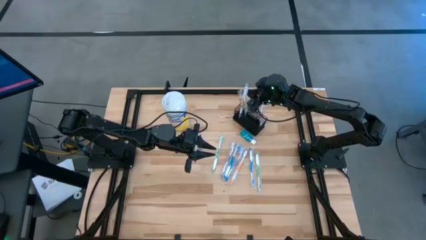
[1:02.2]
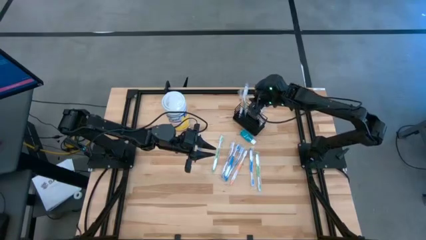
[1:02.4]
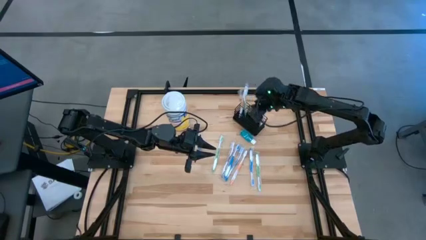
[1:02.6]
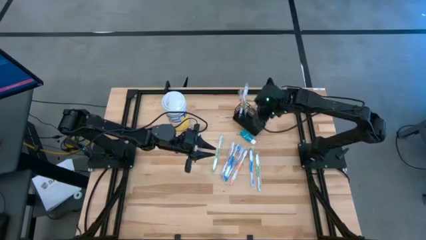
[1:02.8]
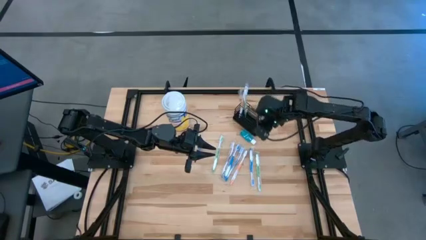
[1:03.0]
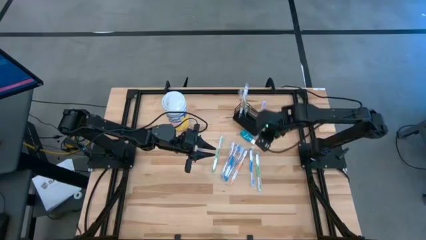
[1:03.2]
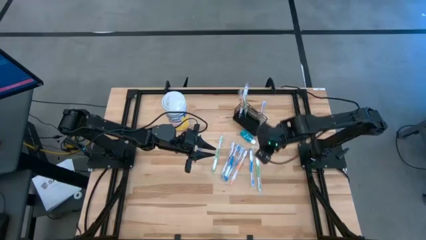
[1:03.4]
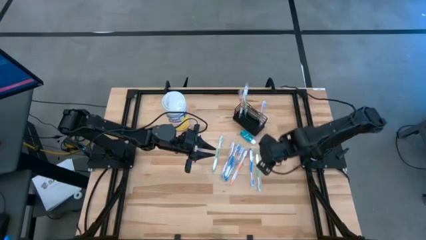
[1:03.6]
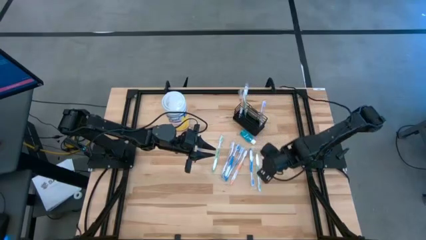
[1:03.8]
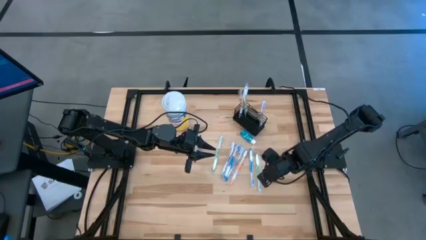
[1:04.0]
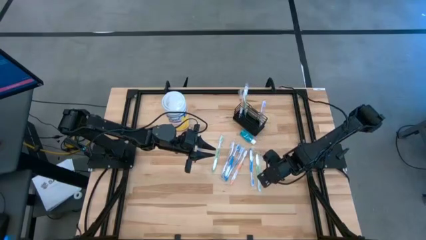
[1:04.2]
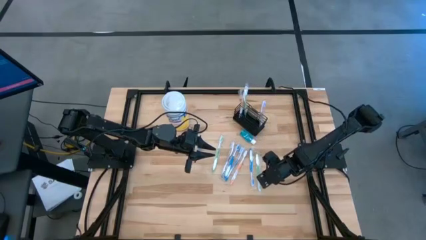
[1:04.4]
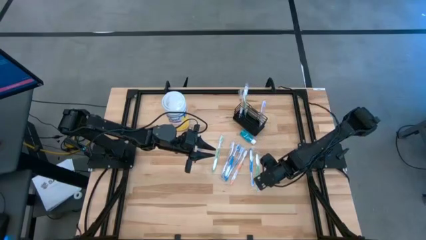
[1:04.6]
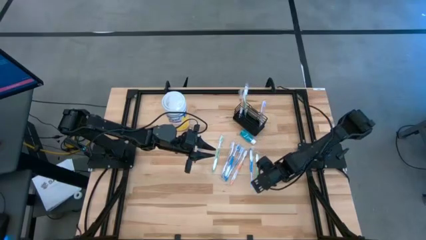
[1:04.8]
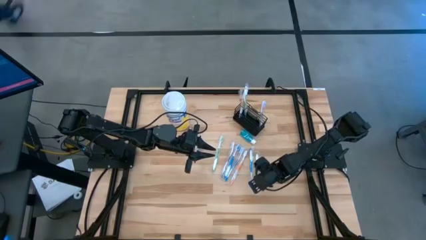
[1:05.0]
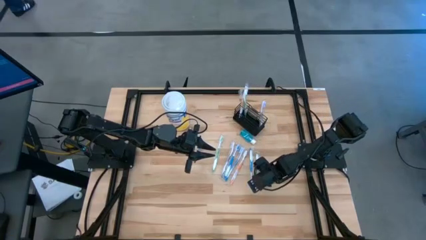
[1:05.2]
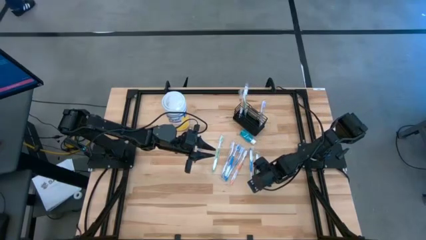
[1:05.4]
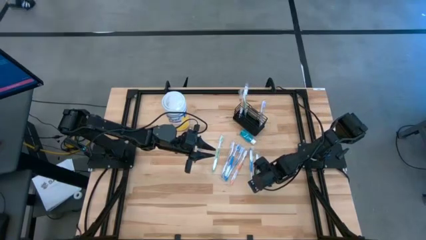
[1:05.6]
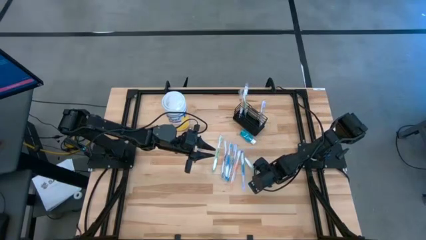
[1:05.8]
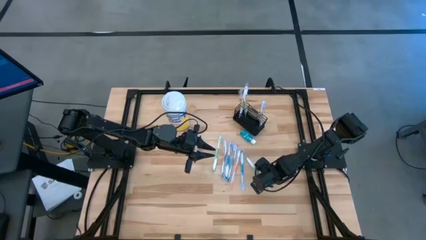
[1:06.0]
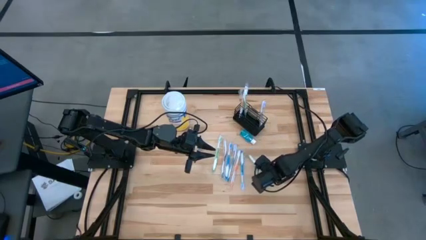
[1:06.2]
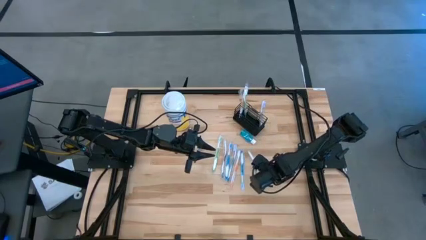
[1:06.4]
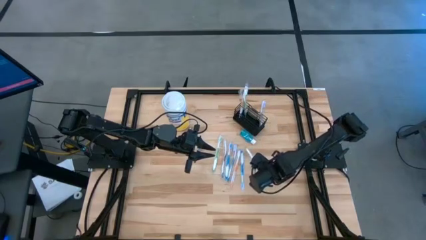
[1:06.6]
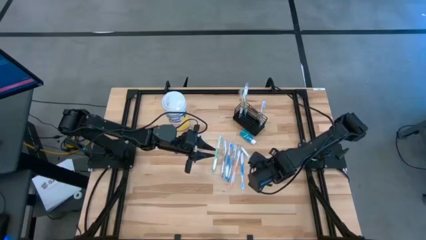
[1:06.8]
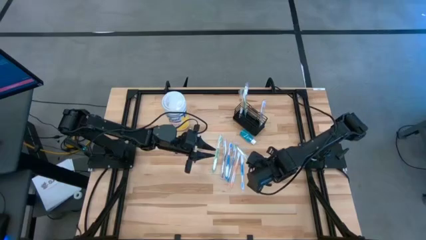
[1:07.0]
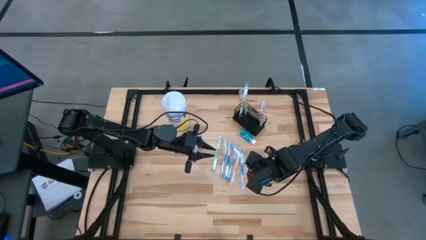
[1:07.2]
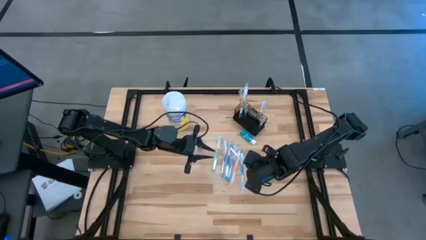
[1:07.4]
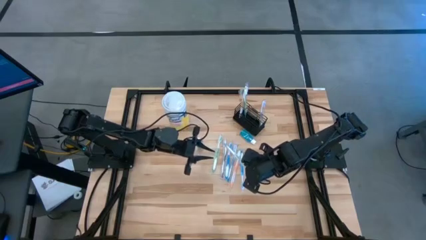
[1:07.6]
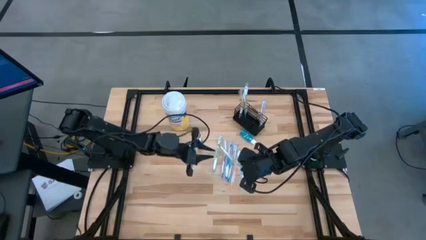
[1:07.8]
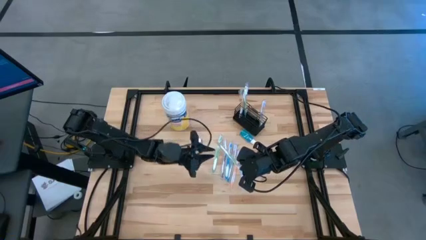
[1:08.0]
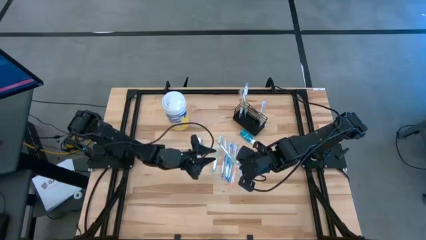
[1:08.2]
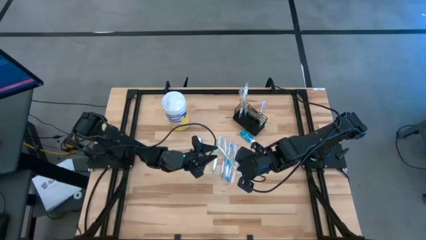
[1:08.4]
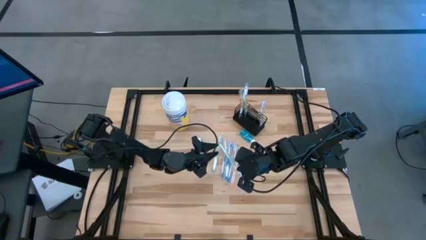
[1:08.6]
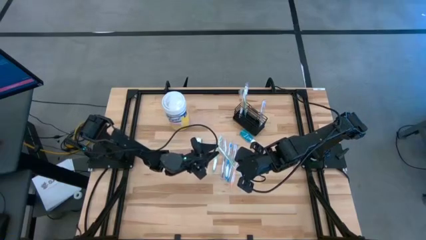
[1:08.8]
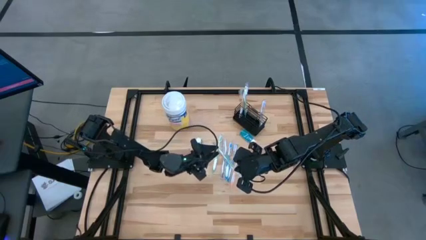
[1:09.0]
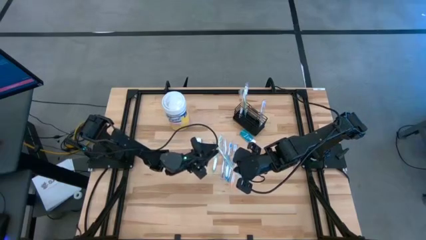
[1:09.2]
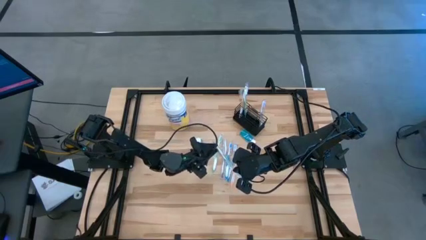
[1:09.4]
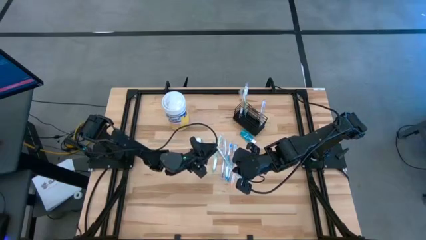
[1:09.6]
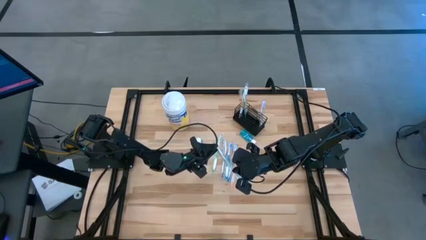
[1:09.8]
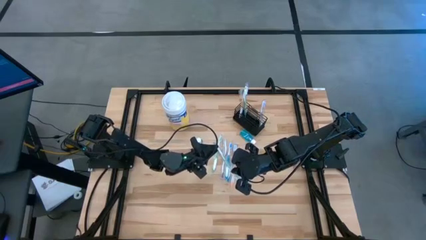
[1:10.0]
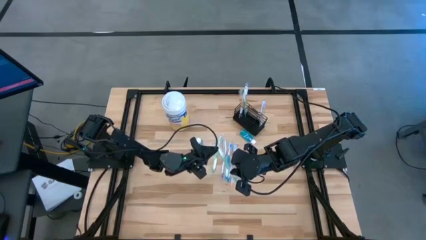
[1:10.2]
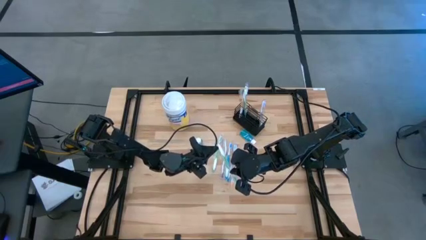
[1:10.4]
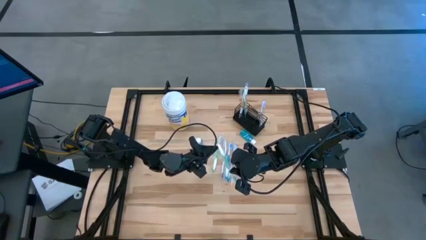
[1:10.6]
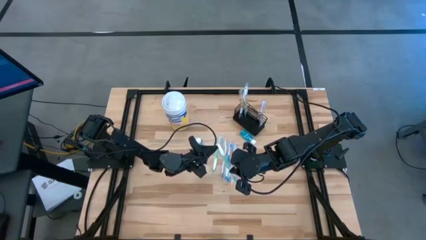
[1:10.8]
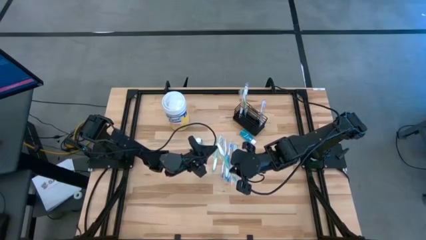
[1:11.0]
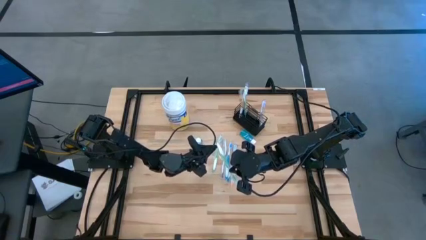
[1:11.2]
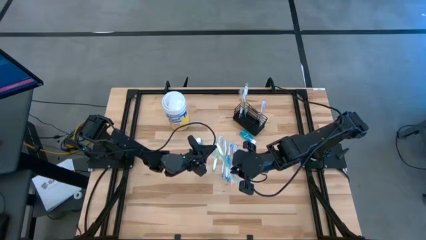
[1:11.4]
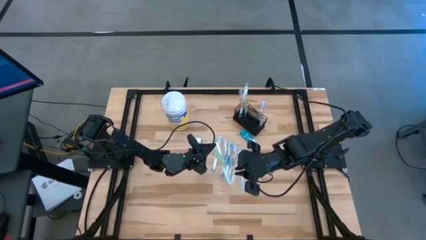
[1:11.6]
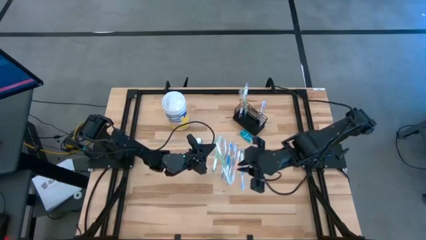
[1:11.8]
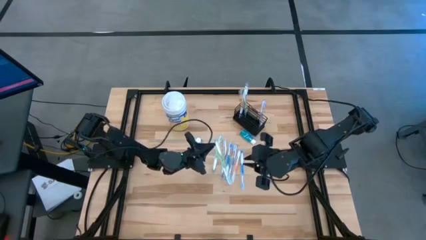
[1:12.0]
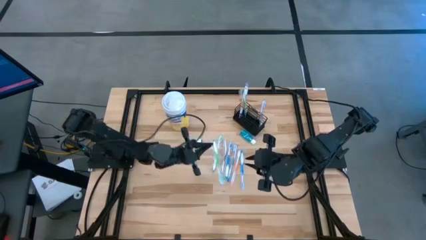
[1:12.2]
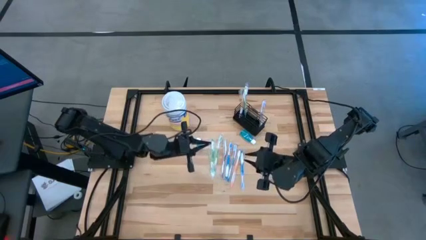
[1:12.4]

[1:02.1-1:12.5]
Task: Pick & Place toothbrushing station
Put the right green toothbrush into the black wire organizer

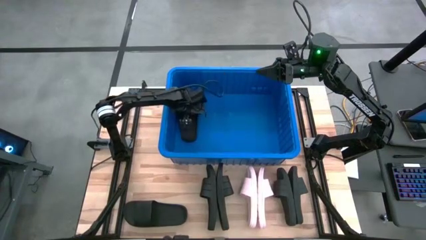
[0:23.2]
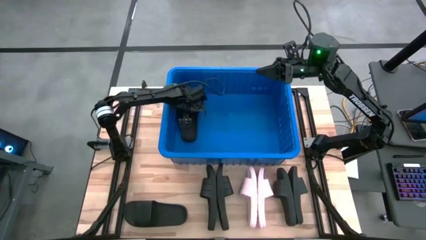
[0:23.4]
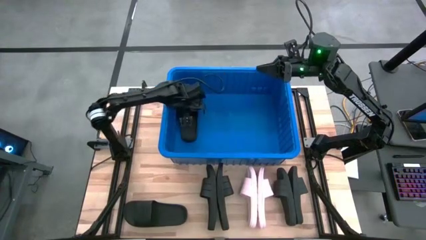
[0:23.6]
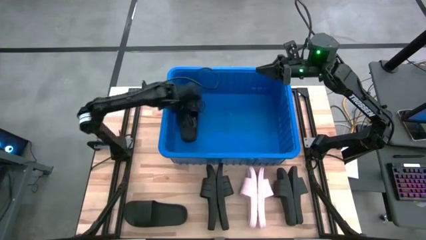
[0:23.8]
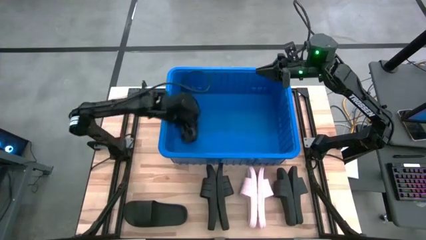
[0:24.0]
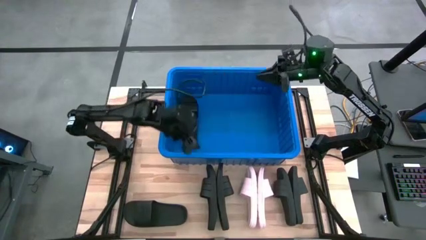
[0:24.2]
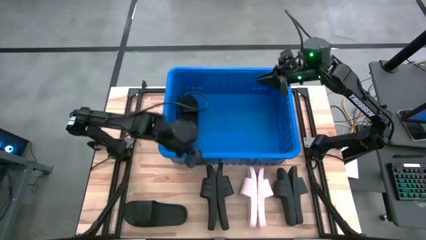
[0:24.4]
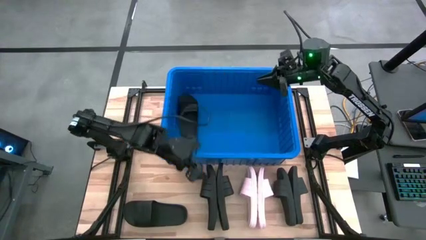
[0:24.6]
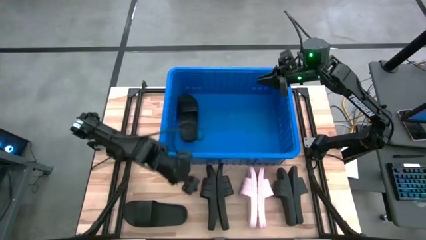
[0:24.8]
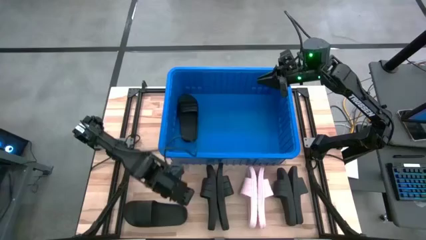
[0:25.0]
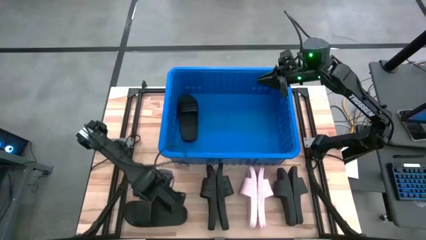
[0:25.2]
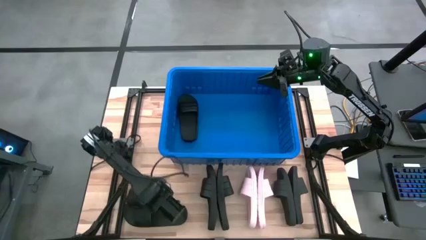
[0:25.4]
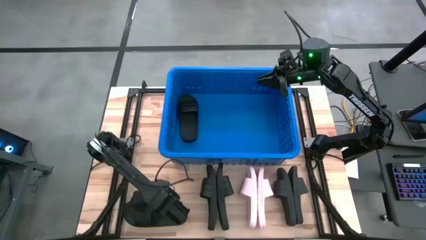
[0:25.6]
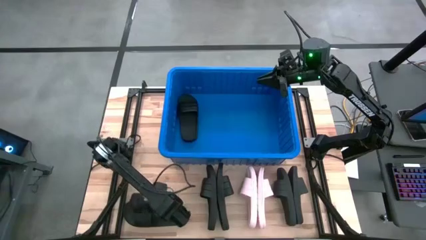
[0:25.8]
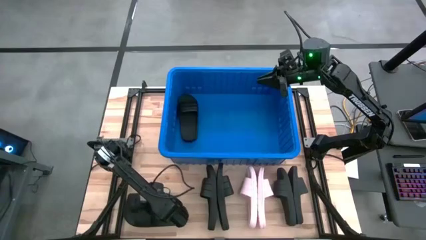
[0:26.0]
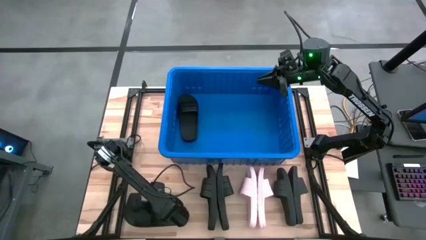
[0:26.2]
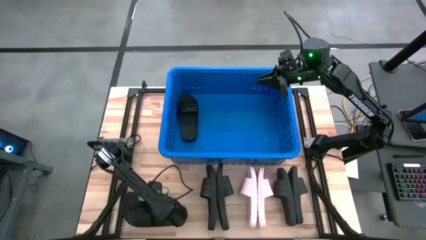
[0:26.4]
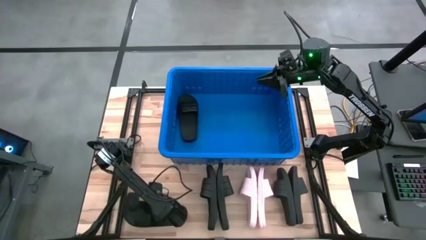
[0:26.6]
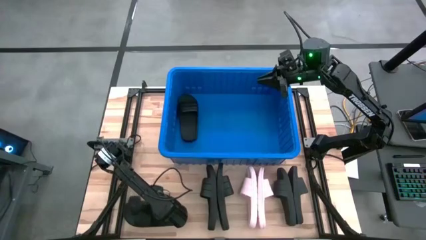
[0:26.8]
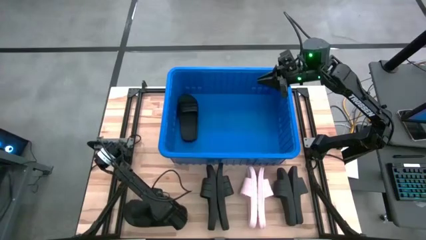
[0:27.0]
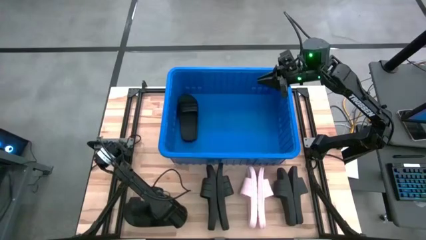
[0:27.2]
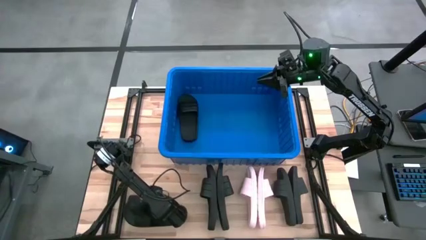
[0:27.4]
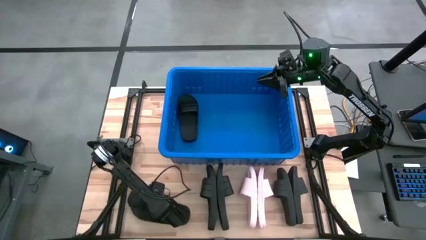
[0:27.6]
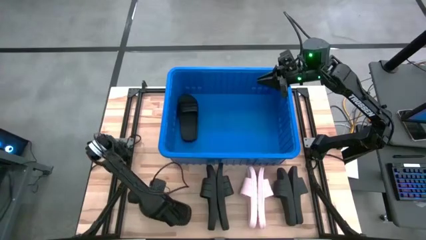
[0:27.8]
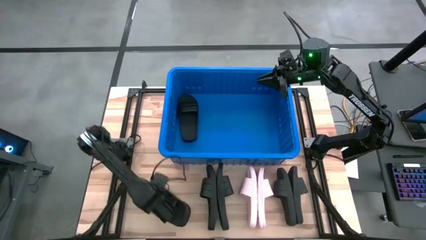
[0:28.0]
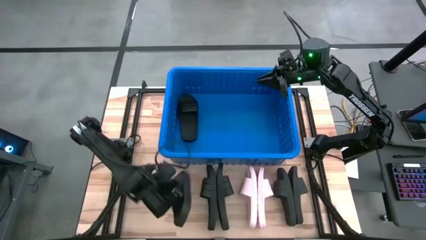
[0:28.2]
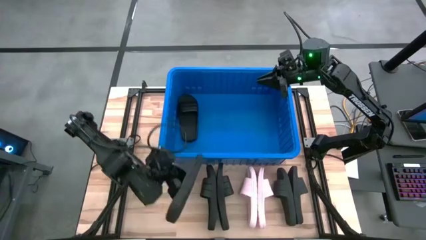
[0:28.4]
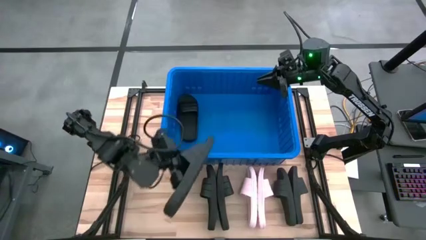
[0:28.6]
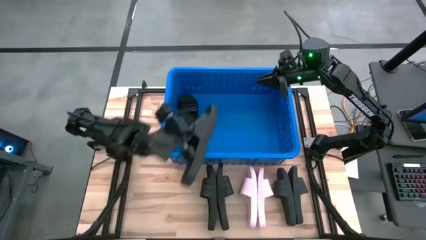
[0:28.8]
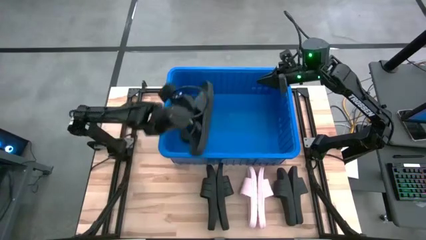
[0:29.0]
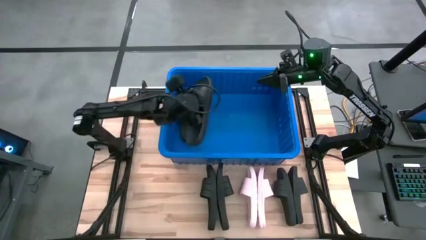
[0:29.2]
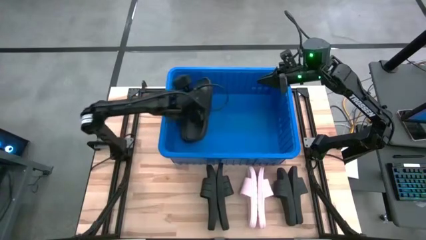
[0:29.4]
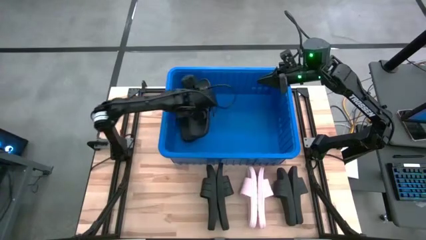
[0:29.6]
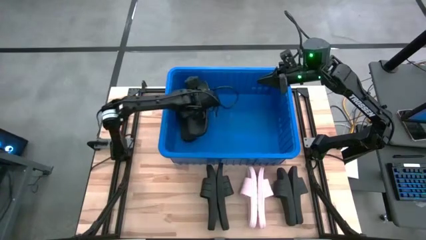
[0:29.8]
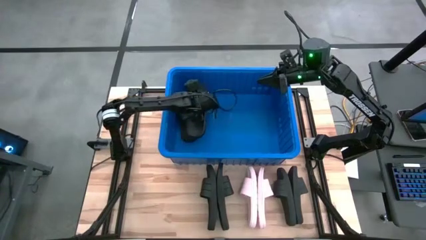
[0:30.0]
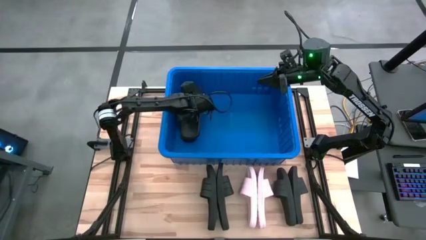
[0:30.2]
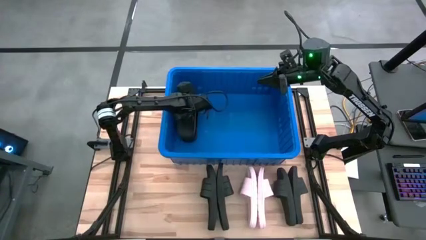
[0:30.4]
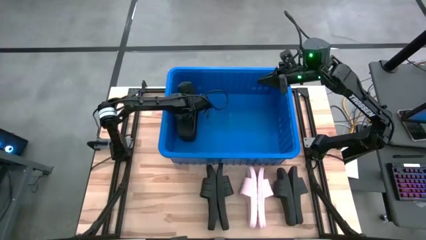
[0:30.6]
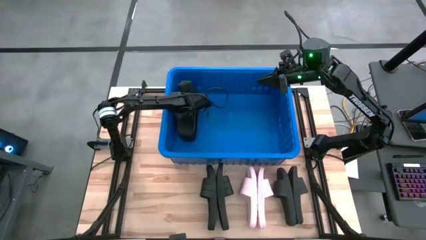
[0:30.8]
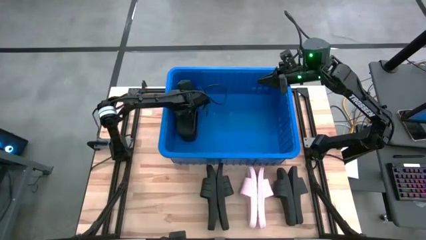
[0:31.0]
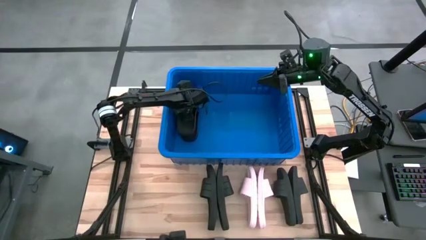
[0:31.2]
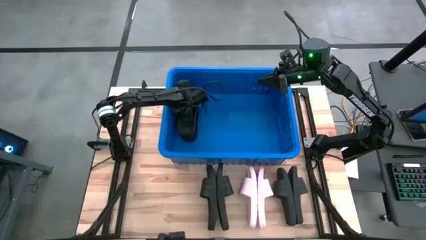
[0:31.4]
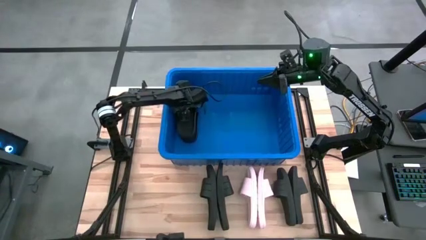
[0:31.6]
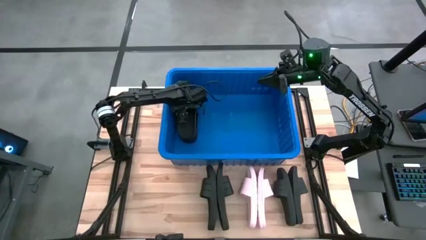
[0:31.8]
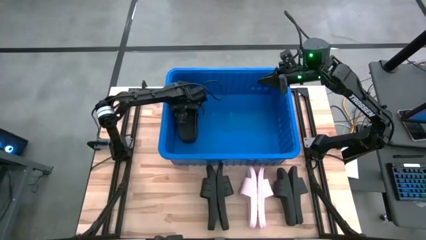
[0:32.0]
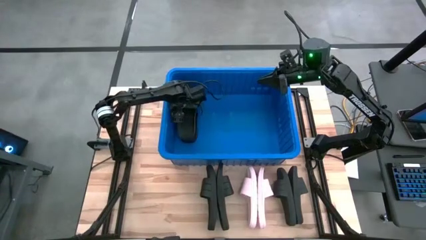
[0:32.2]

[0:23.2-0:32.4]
Task: Pick and place slides into bin
Put the black slide into the blue bin
